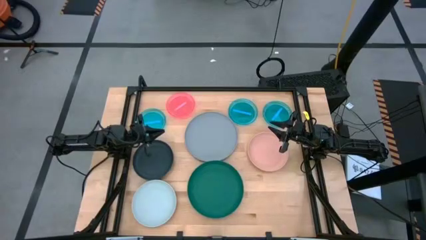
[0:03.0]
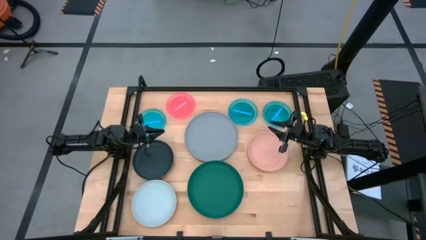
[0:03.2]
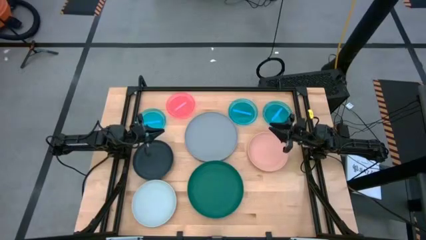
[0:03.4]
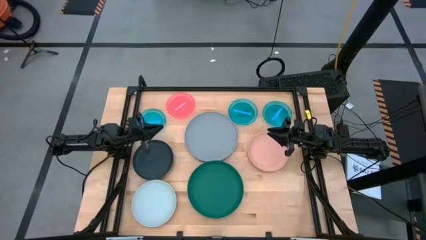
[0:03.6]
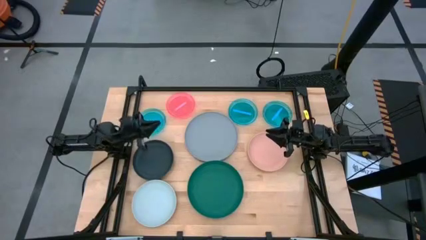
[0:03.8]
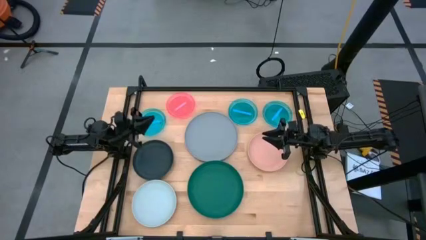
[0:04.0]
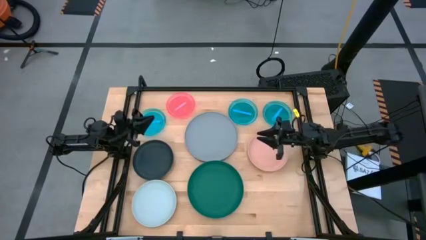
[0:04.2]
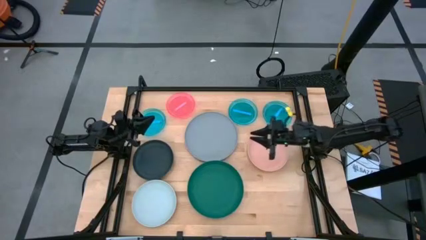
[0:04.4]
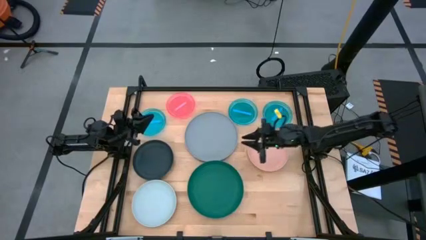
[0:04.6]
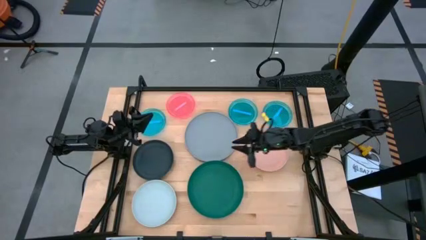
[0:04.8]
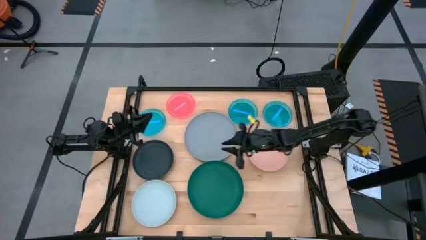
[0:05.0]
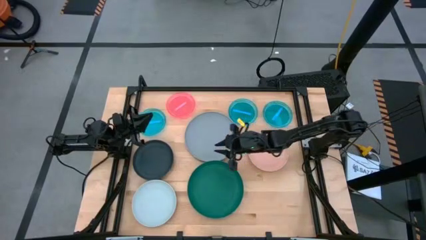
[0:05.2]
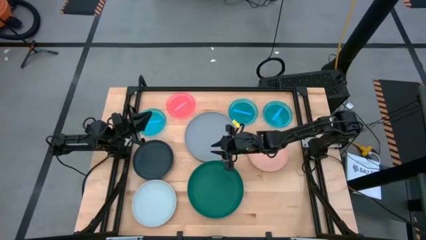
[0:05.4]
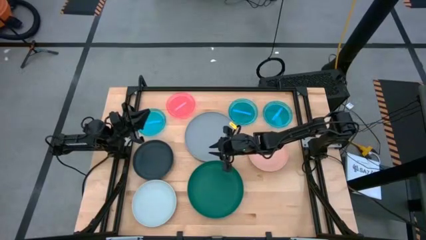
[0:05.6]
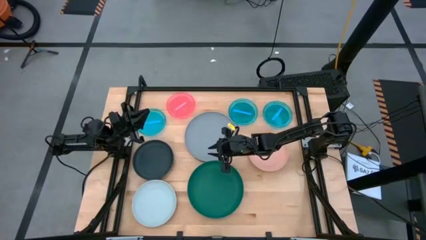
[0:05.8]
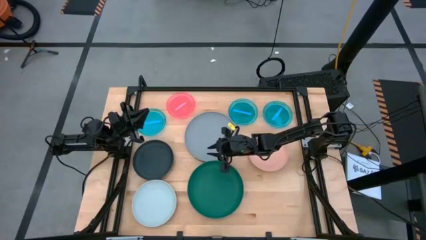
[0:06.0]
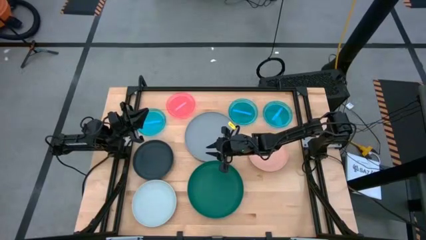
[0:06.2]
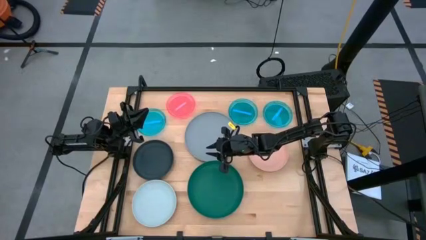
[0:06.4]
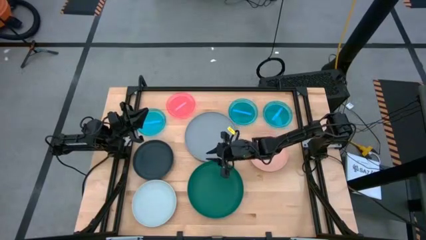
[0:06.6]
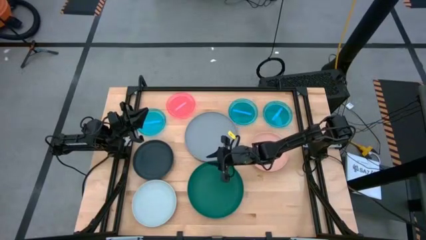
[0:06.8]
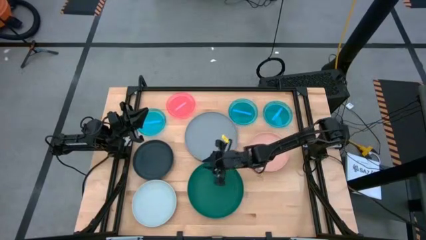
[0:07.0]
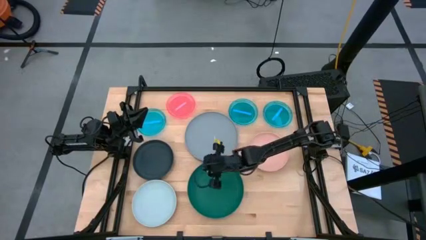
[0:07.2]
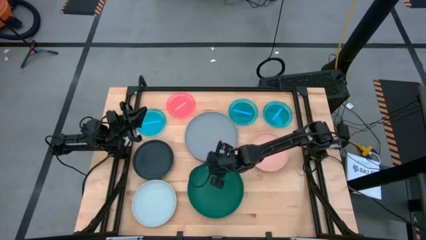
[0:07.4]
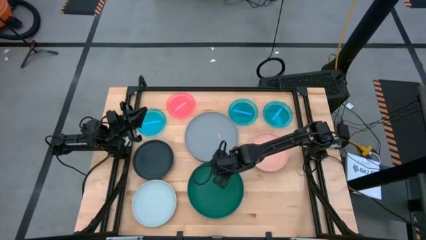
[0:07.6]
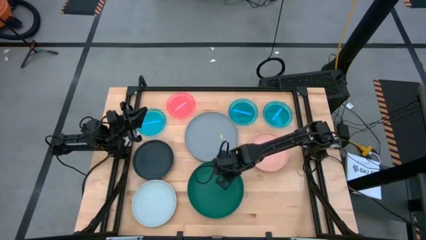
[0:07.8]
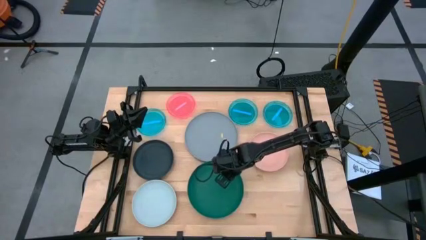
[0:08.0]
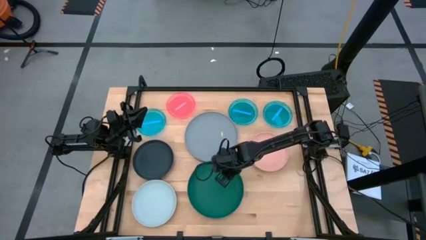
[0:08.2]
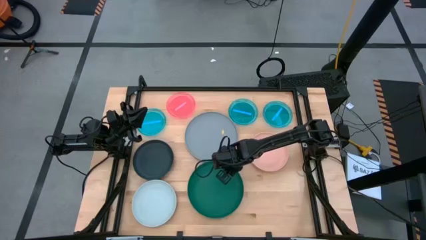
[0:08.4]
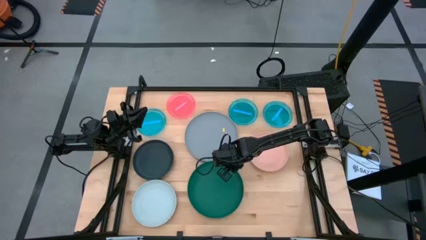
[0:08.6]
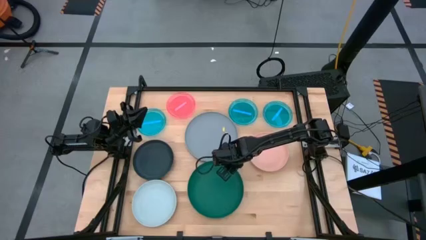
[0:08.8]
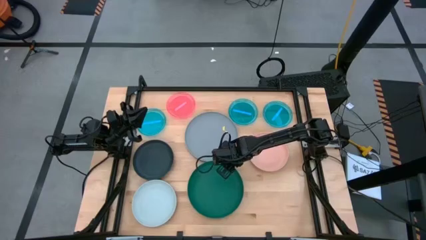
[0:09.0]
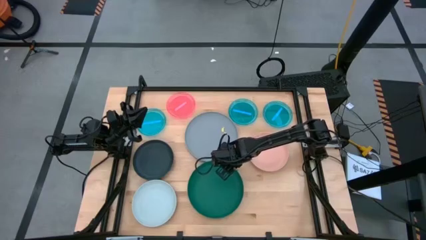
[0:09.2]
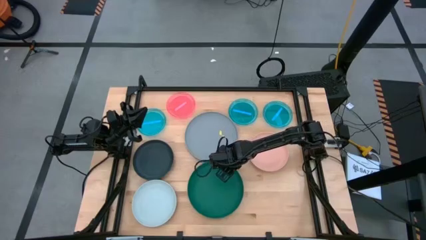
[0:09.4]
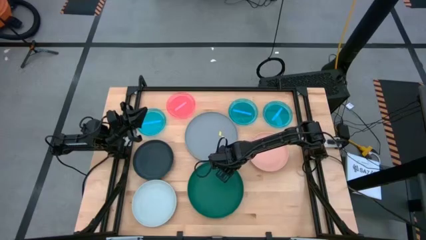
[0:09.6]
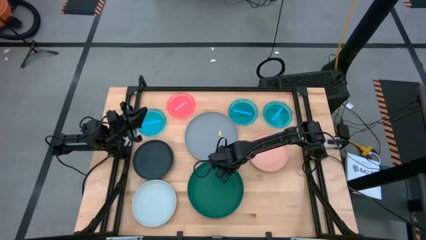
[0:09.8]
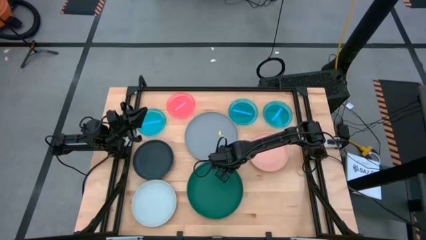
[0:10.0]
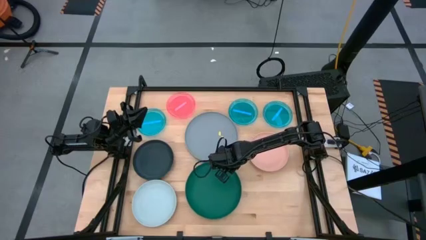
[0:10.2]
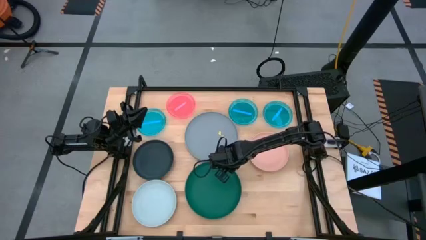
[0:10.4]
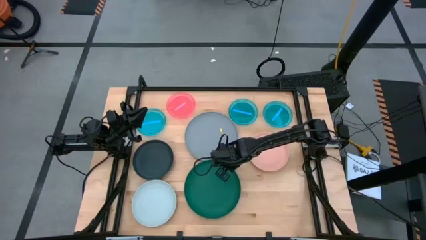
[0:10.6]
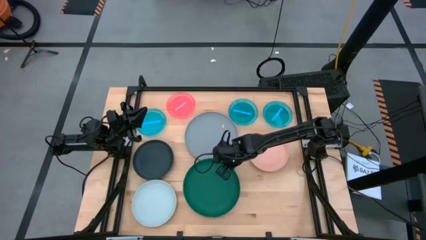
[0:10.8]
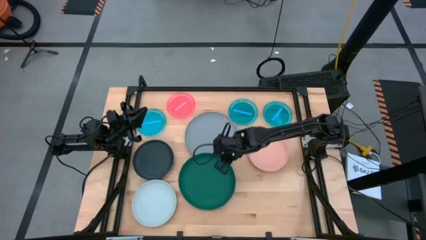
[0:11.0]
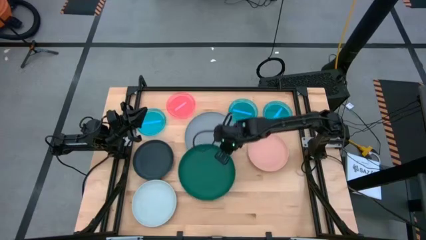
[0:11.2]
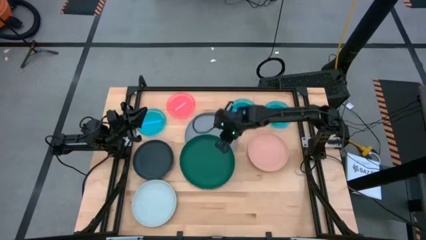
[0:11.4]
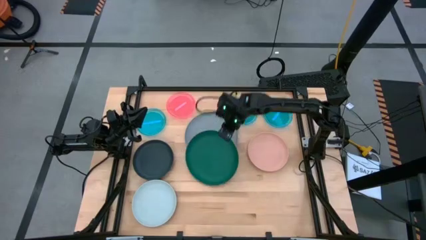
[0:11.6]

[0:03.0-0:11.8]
Task: Stack plastic plates
Stack the dark green plate on top of the gray plate

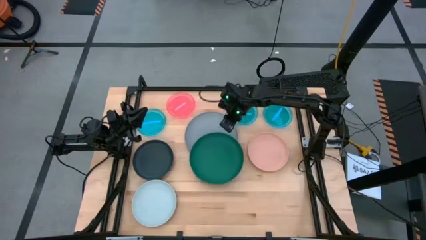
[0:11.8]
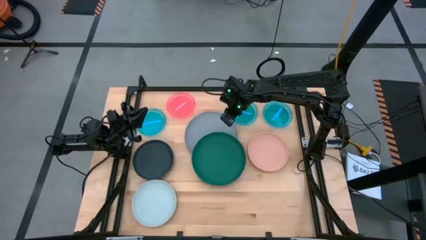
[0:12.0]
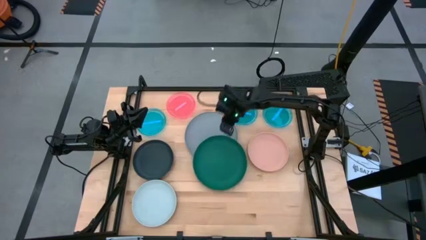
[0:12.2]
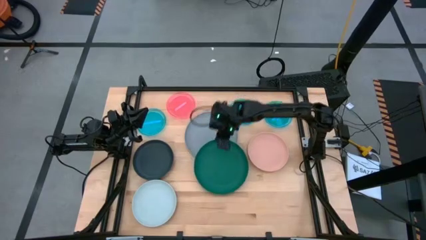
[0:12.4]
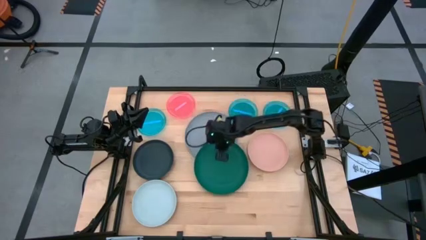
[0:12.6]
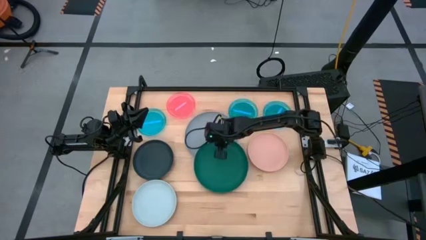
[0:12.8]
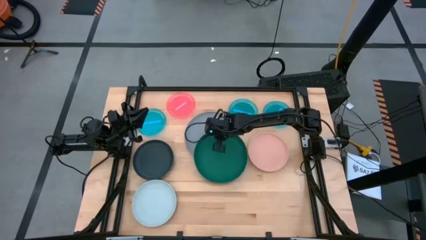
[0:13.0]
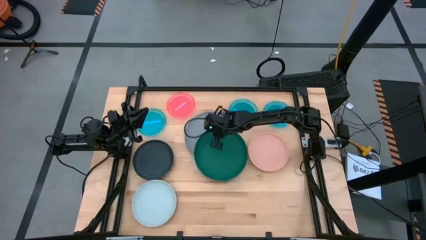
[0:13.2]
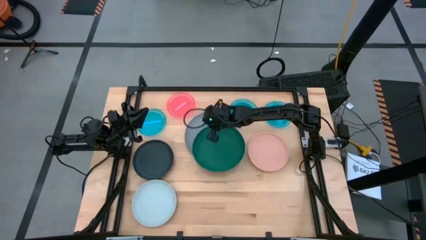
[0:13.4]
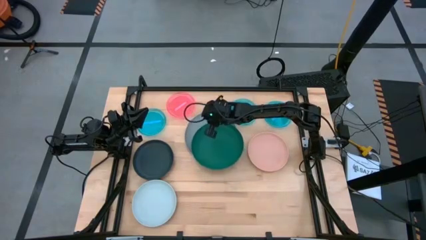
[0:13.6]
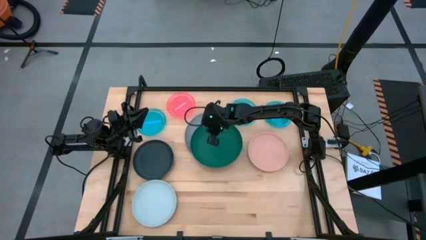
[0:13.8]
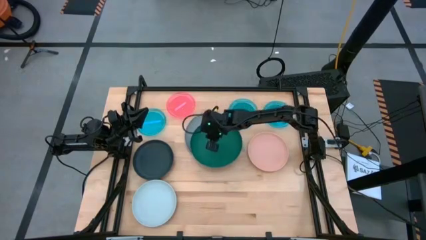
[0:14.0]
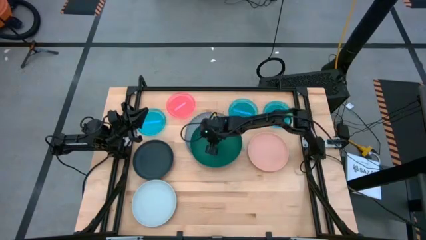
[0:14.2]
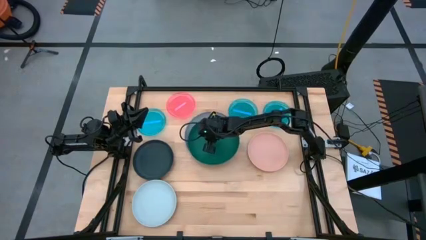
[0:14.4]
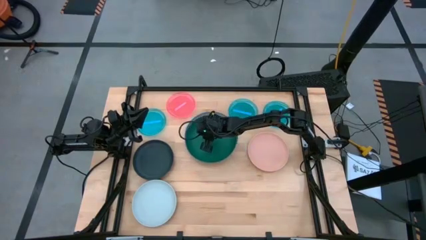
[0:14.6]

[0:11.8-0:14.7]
Stack the dark green plate on top of the gray plate

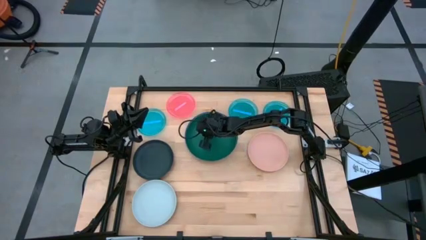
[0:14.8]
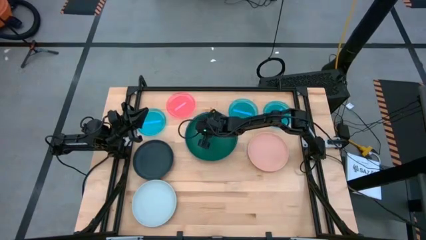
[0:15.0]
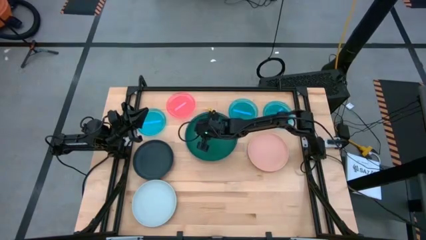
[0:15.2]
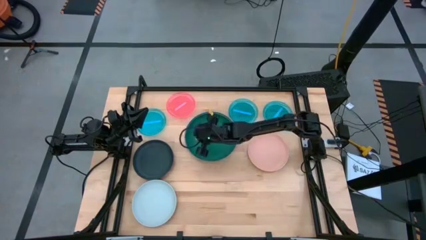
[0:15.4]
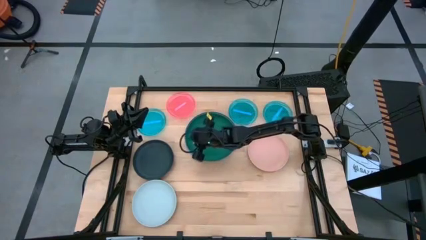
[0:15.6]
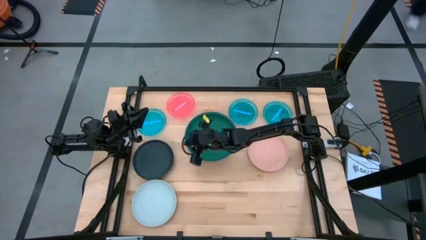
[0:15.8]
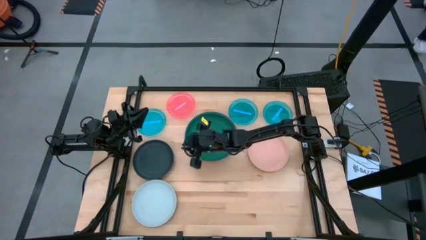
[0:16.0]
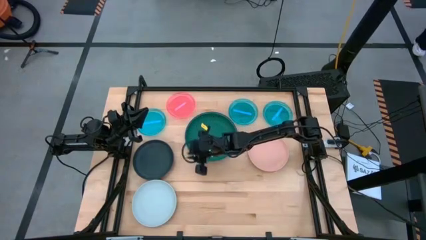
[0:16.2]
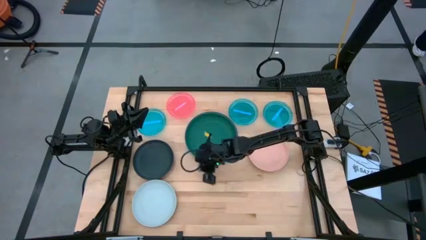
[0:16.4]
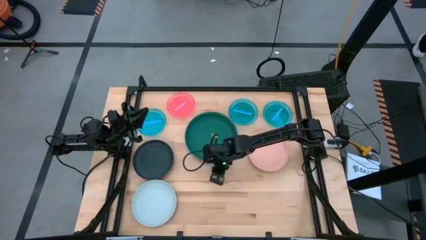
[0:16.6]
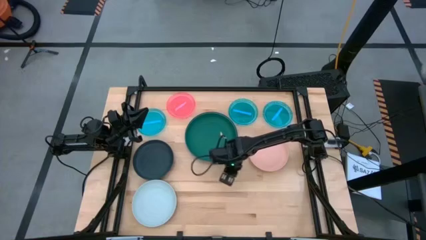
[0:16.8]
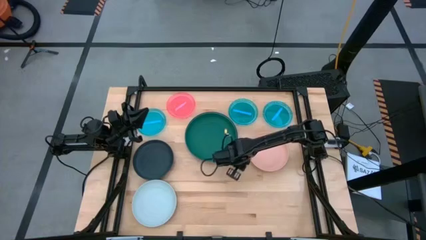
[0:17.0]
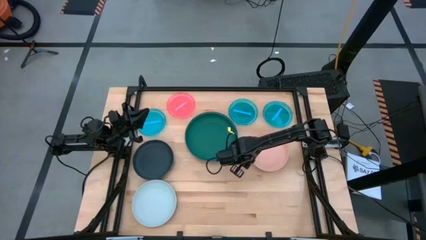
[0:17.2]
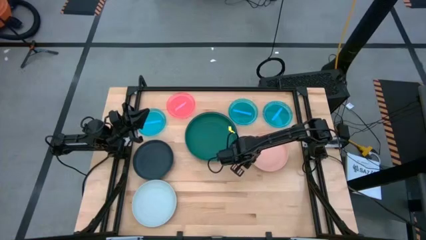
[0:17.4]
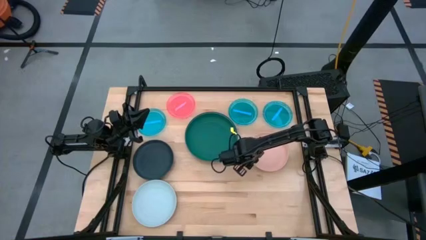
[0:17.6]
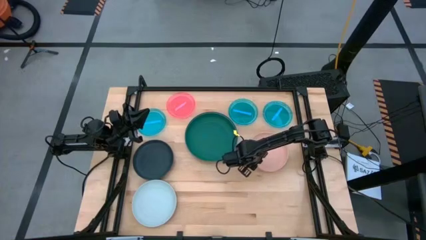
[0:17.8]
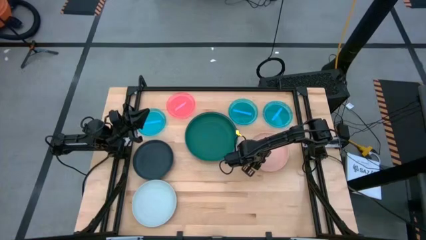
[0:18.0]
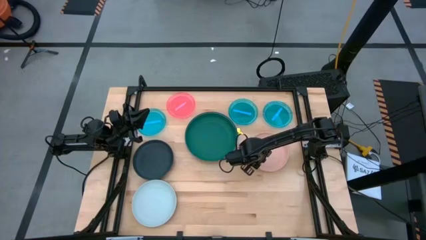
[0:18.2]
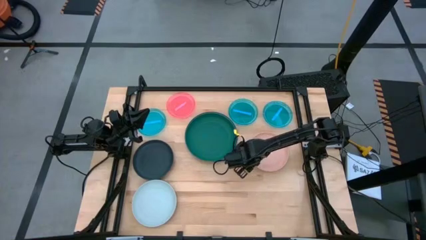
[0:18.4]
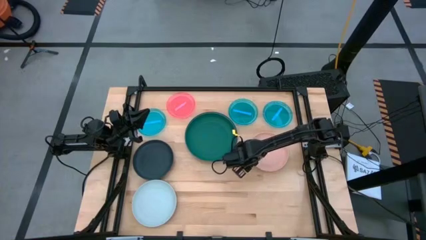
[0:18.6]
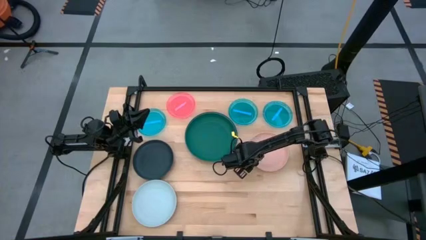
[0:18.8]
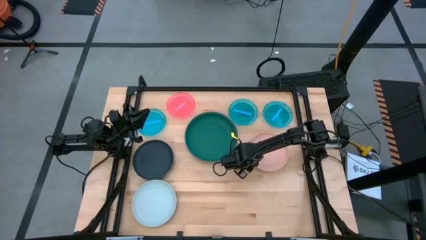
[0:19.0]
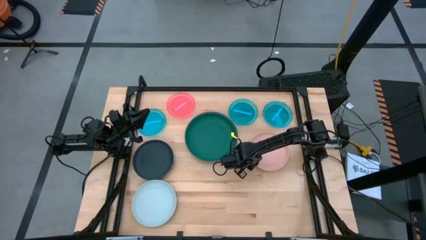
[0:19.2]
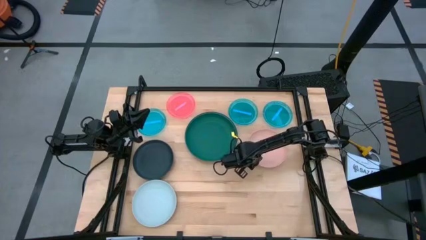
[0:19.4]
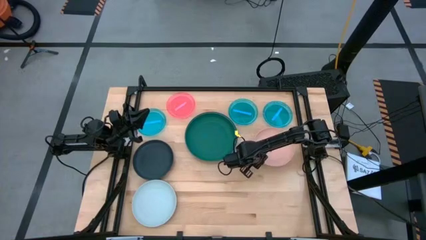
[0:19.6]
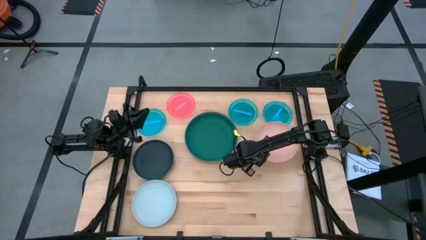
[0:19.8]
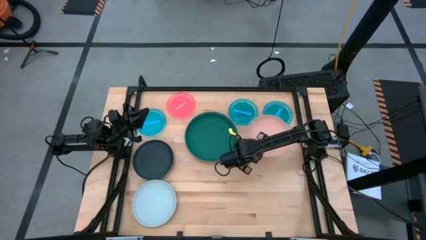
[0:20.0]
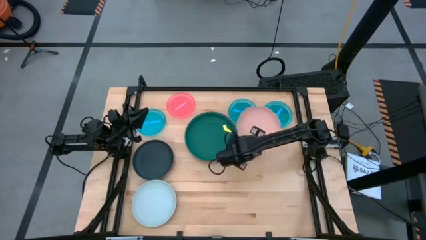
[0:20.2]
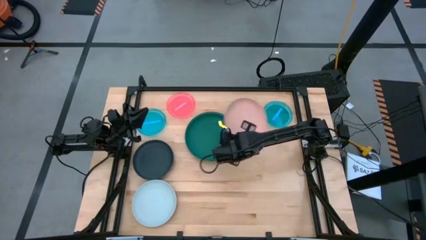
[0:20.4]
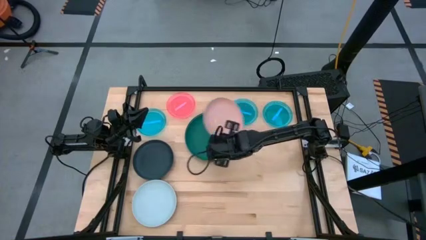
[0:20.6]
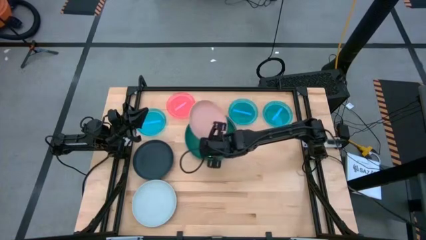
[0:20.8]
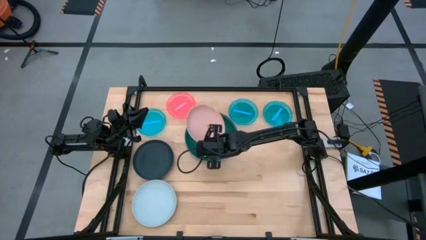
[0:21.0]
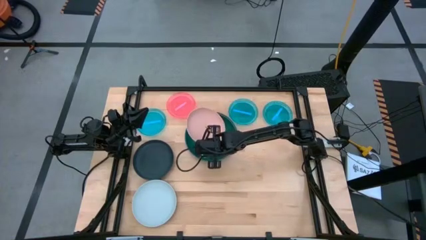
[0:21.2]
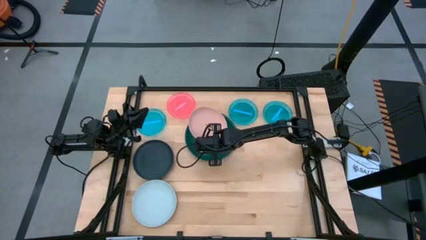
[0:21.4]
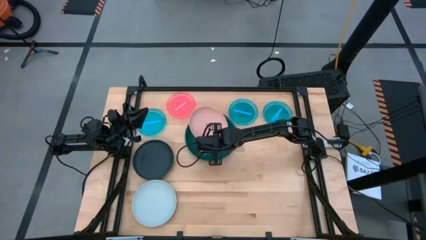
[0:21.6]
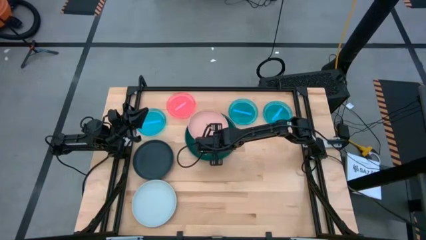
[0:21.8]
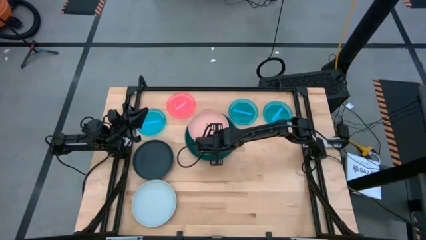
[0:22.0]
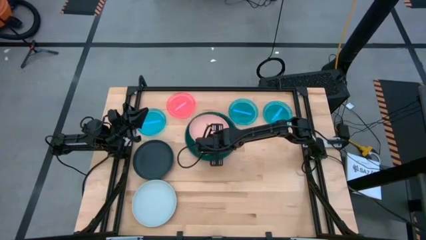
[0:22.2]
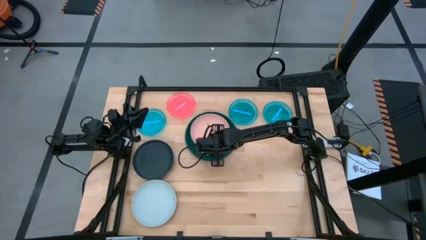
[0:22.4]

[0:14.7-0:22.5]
Stack the pink plate on top of the dark green plate
